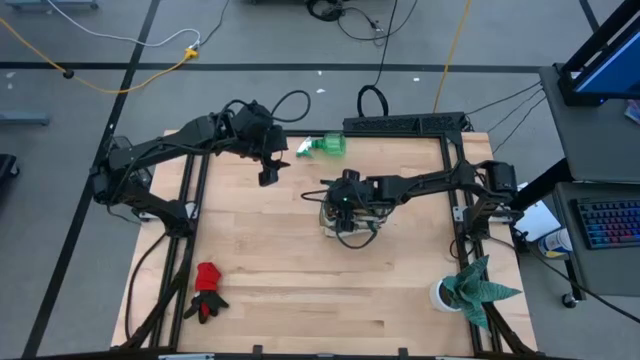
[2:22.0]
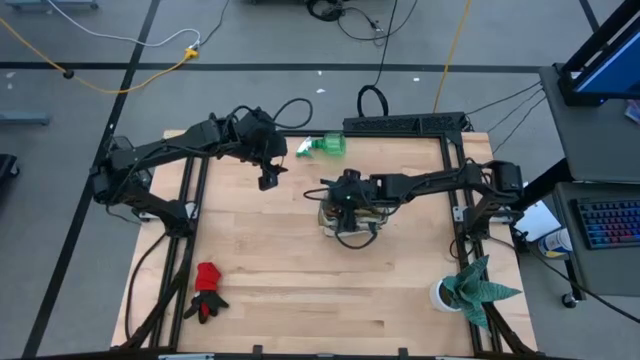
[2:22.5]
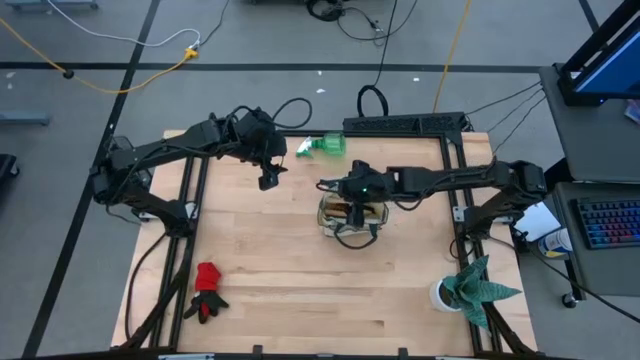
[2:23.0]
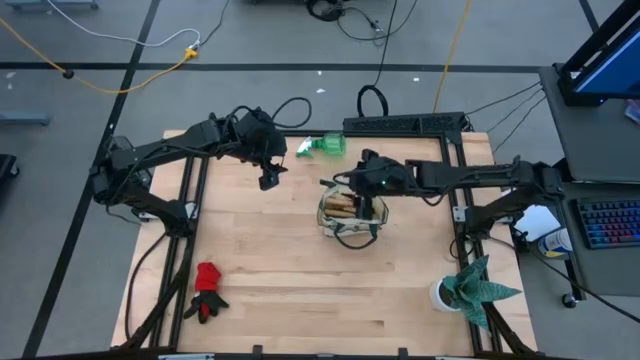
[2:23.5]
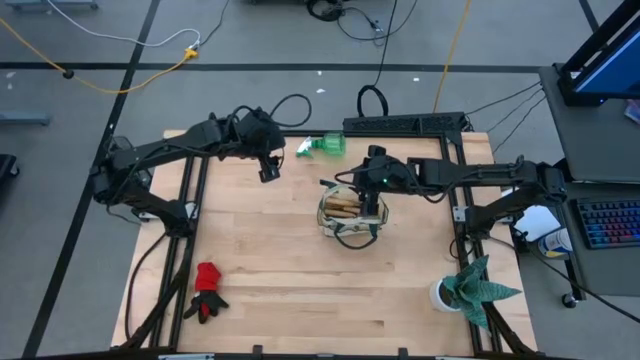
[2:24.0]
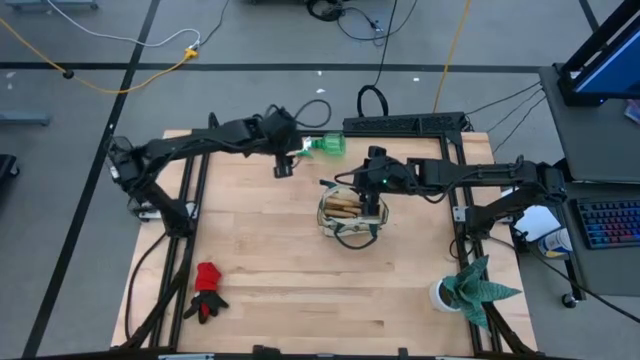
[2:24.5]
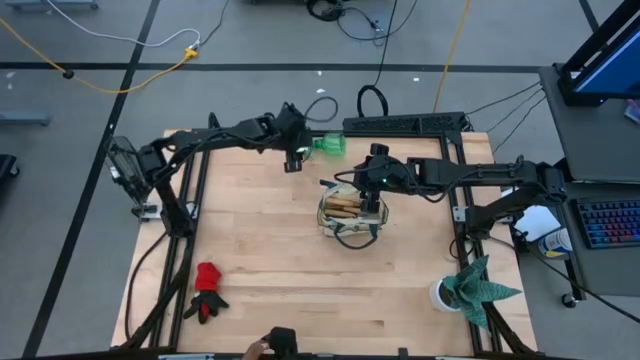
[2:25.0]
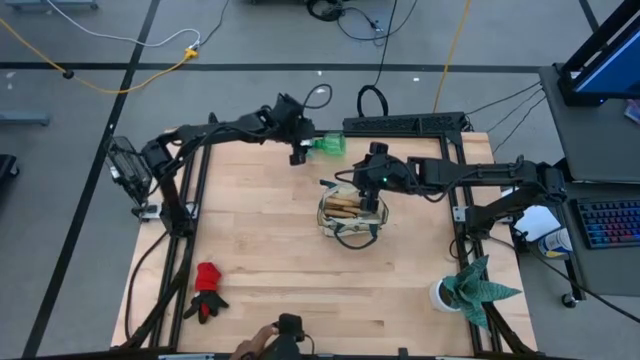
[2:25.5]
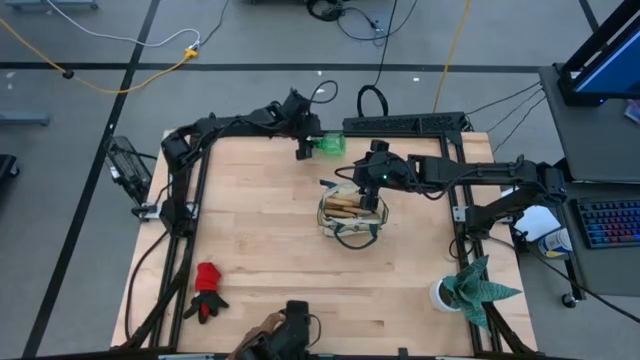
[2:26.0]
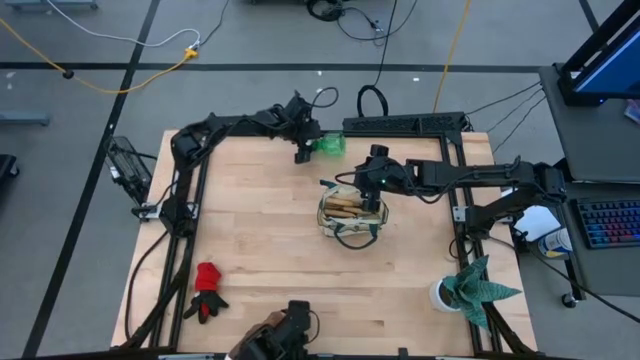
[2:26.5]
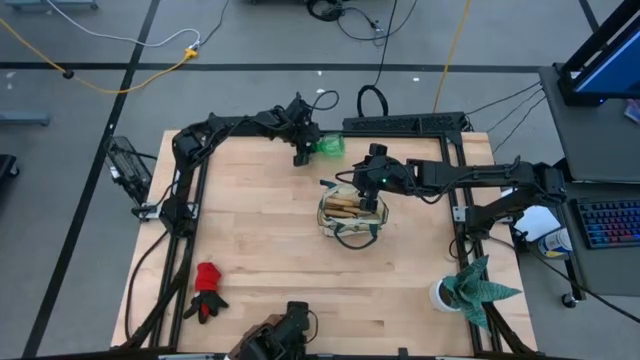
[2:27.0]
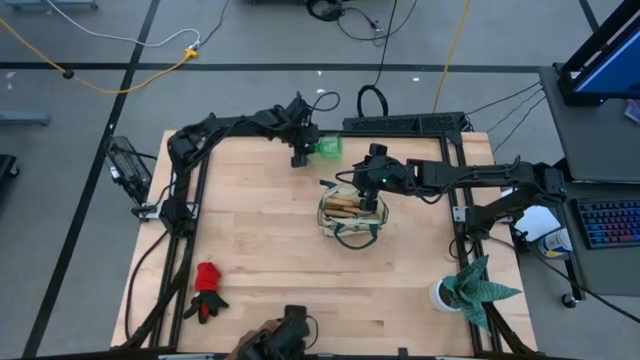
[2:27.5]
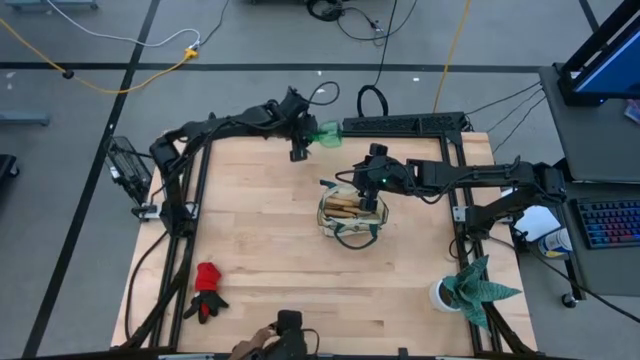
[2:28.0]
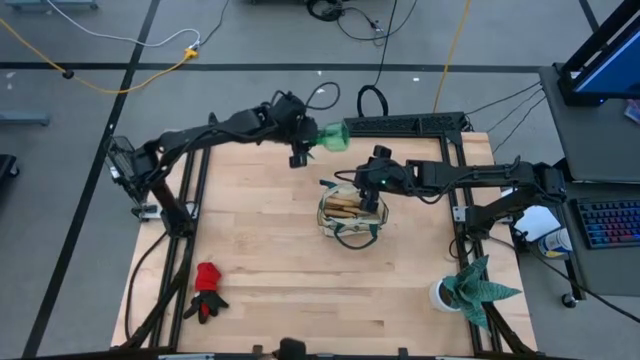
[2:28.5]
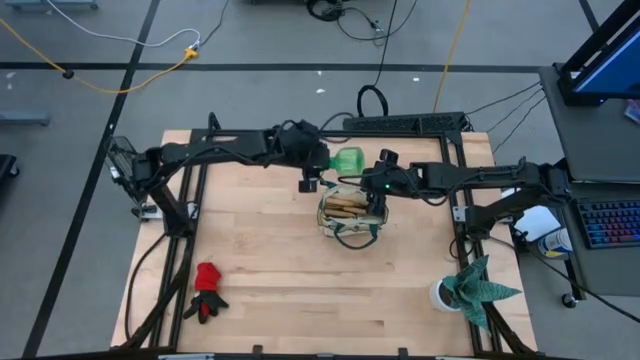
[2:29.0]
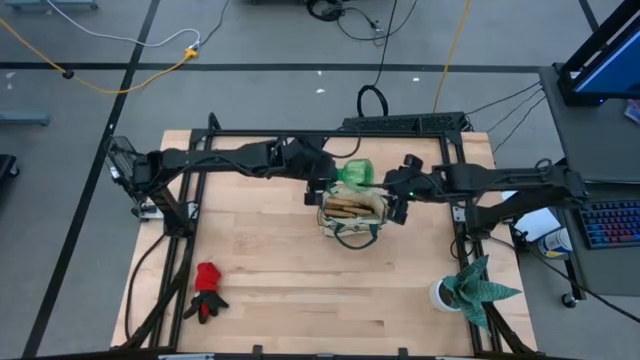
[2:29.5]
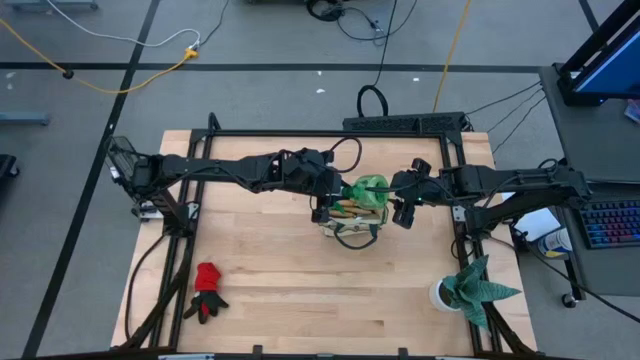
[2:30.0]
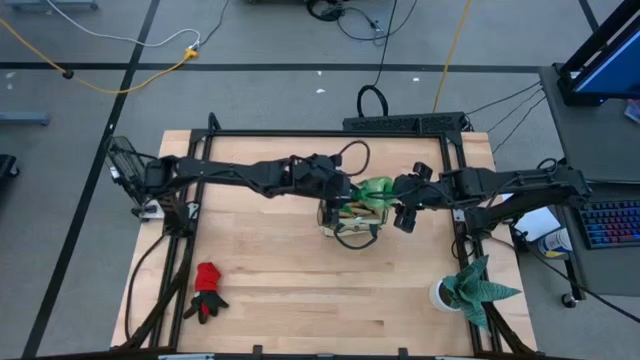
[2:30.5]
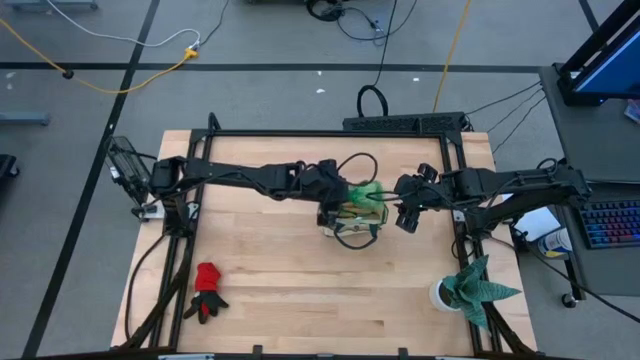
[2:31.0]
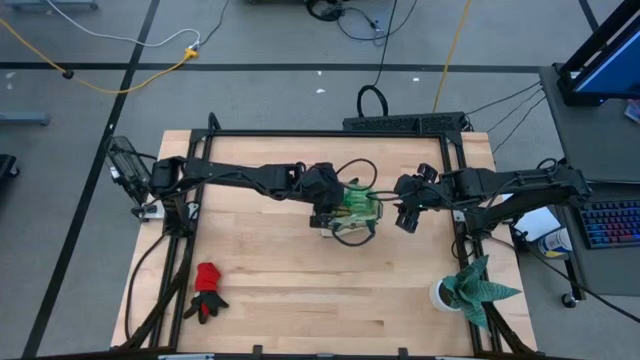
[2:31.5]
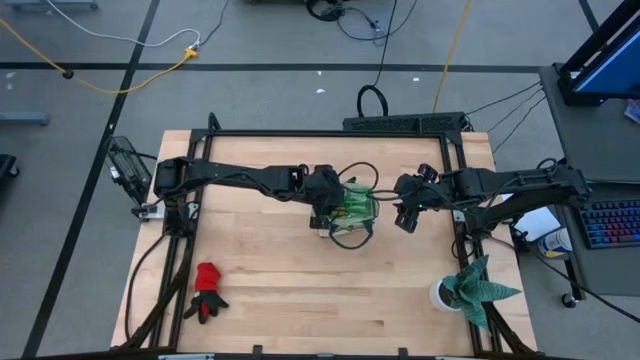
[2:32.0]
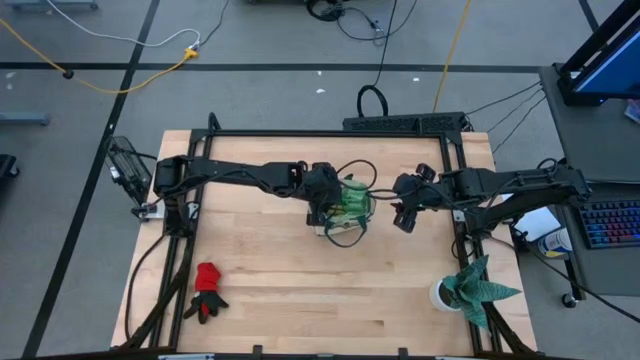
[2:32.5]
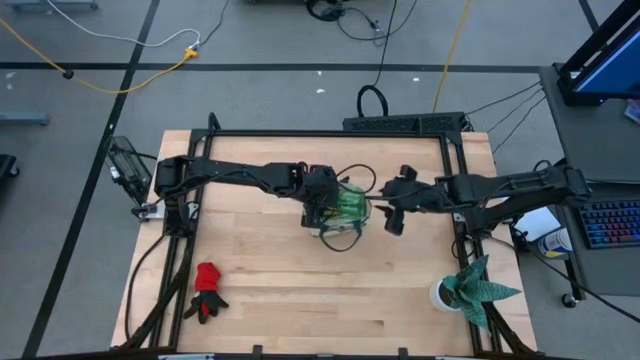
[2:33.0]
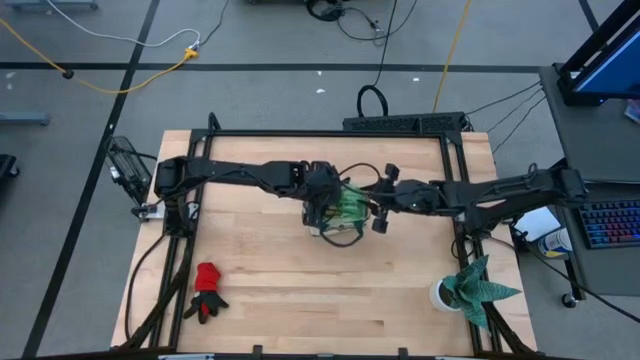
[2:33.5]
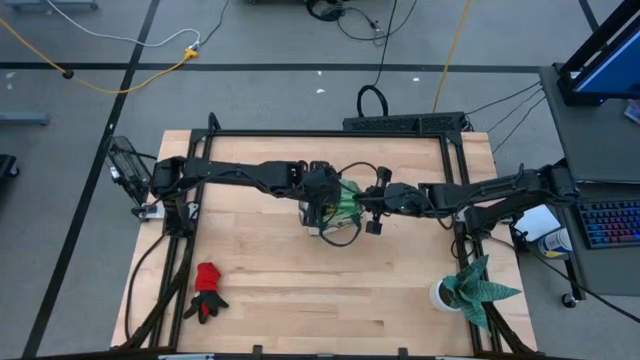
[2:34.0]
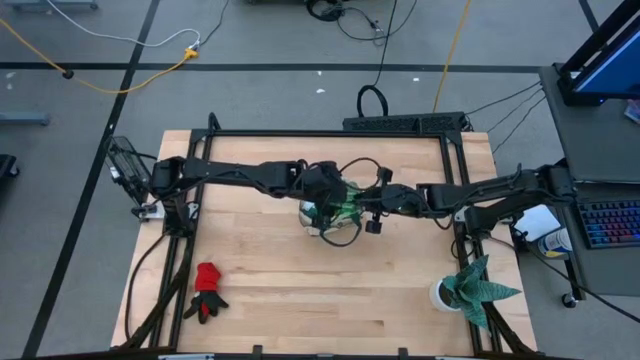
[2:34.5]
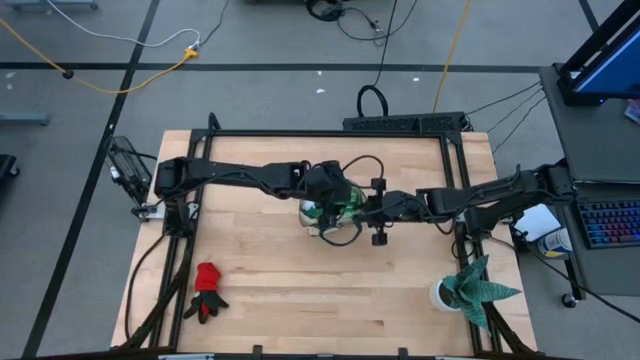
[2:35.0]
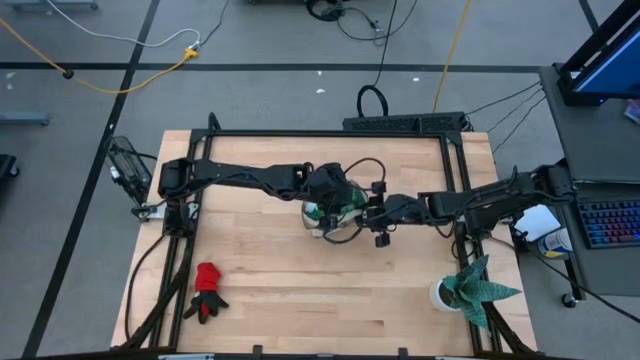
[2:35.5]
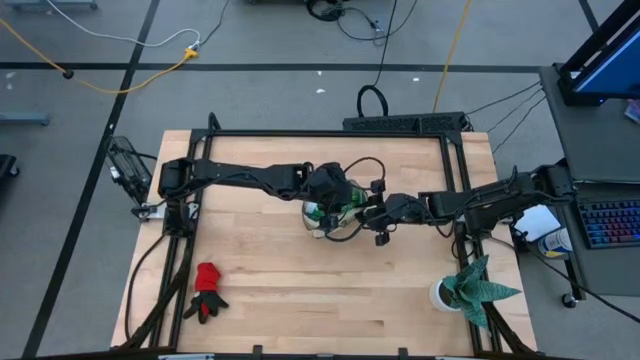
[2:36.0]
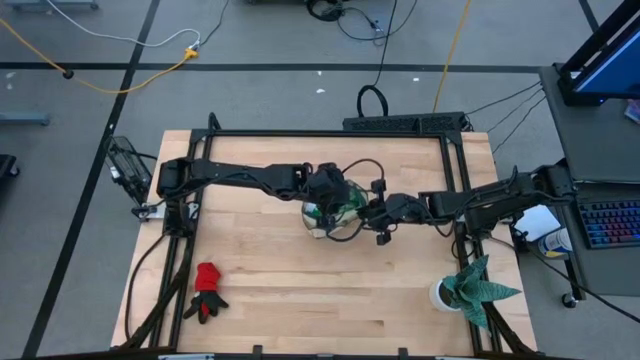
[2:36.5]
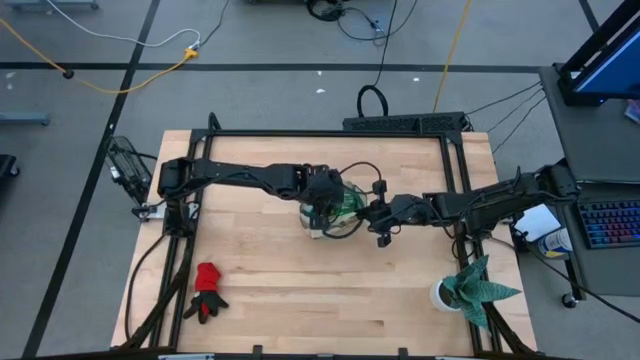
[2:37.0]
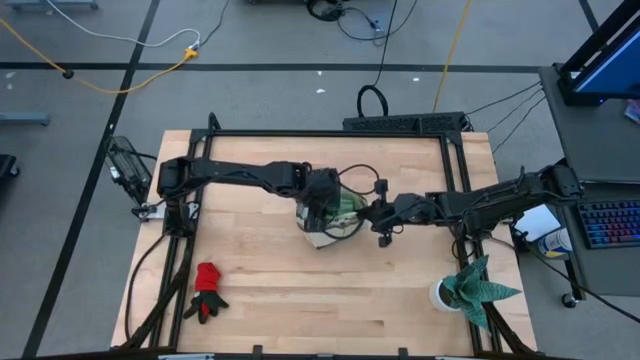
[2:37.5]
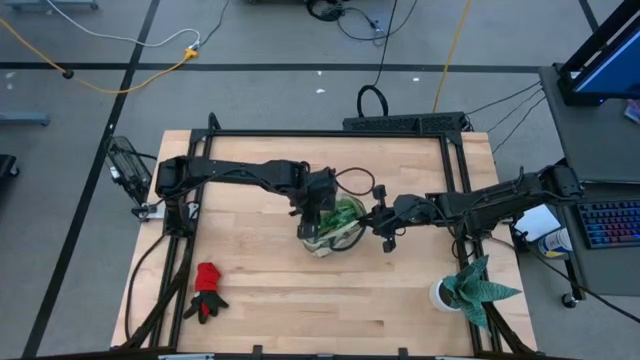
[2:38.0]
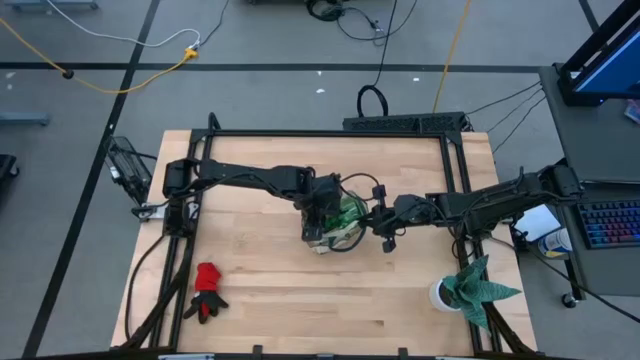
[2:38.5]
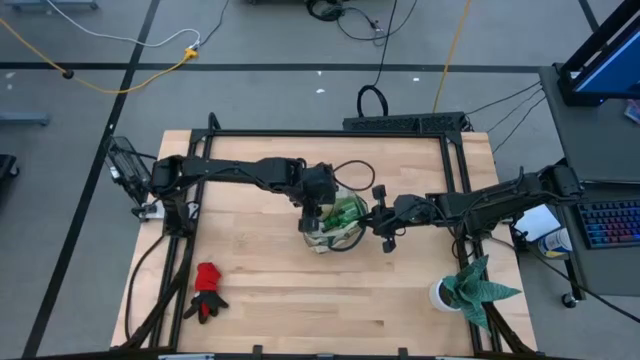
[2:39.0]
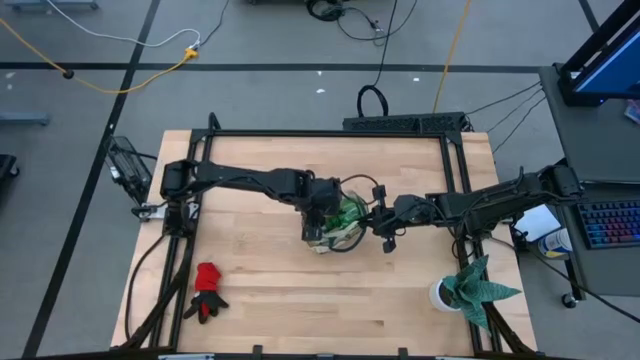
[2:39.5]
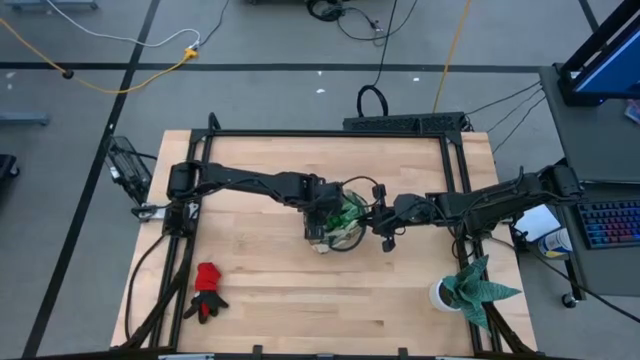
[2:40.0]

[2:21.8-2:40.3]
Task: Pick & Place Garden tools in Gardening bag
Put the green spray bottle into the brown gardening bag

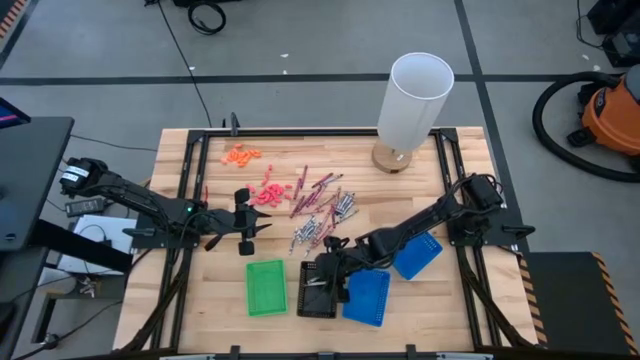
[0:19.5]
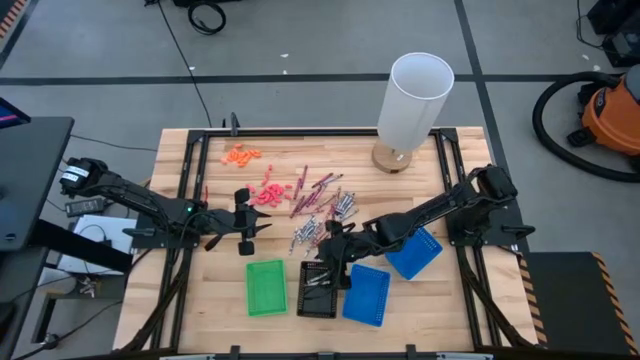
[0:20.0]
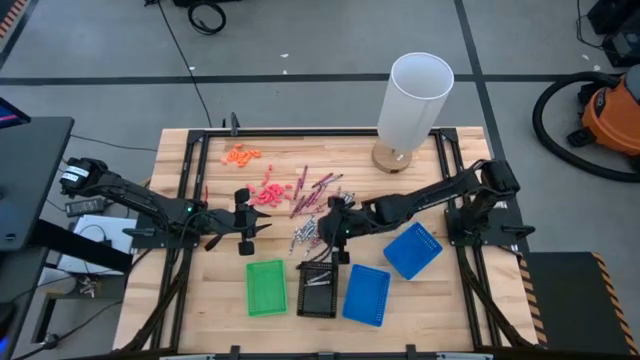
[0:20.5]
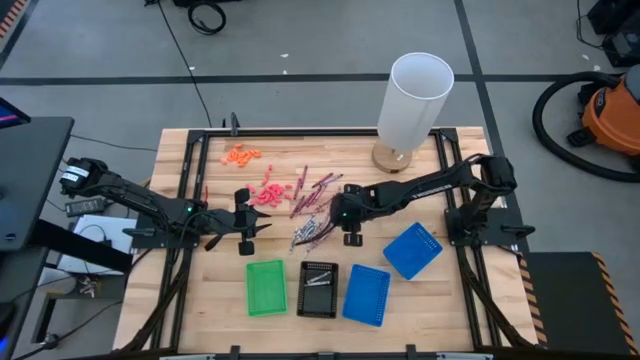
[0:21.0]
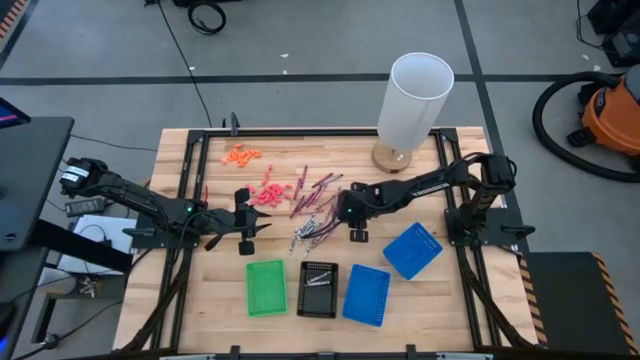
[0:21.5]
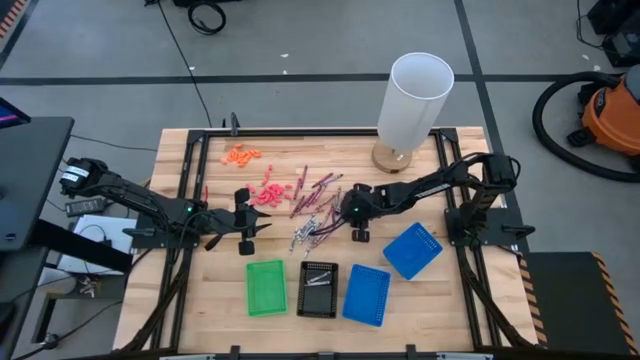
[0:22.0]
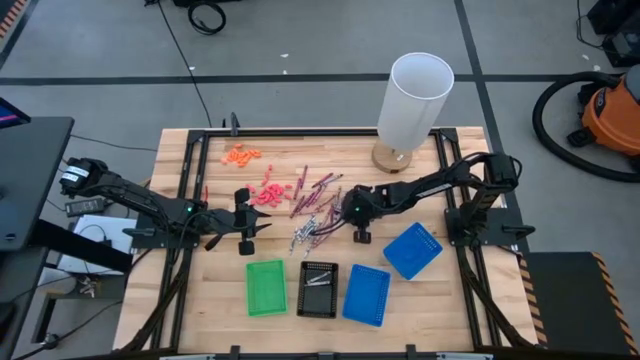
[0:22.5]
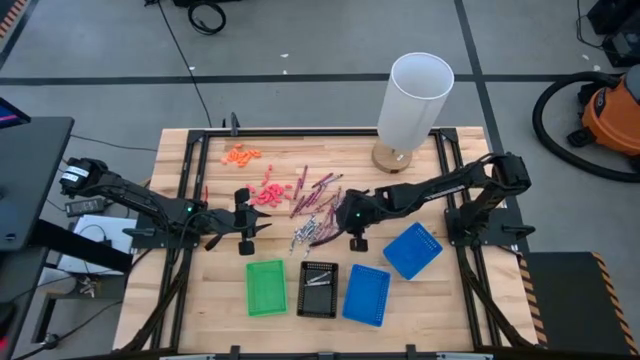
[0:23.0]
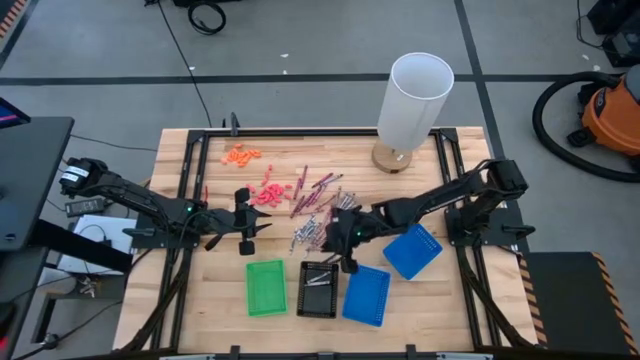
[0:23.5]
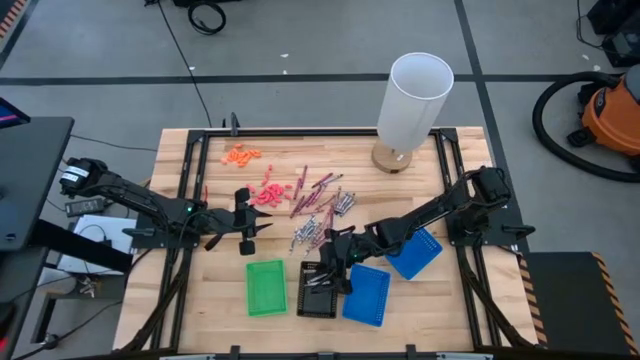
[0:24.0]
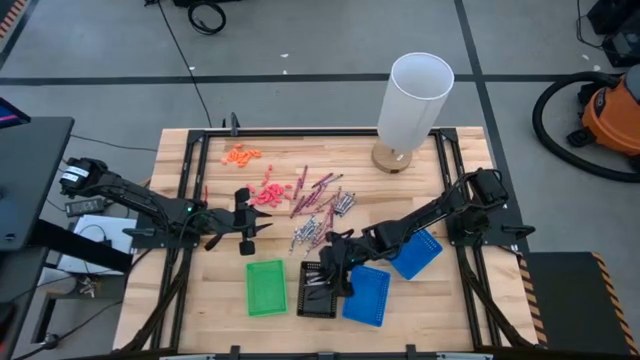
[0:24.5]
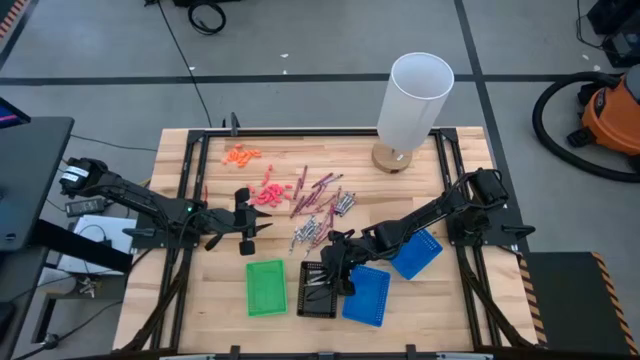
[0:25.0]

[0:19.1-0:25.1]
Task: Sort crayons
Put the black crayon into the black basket
